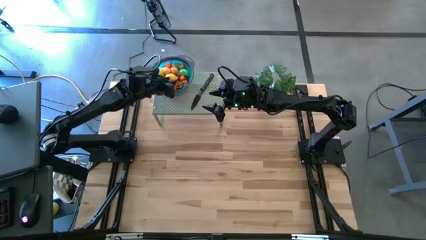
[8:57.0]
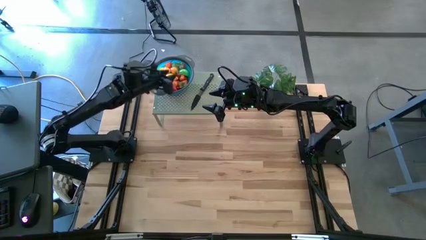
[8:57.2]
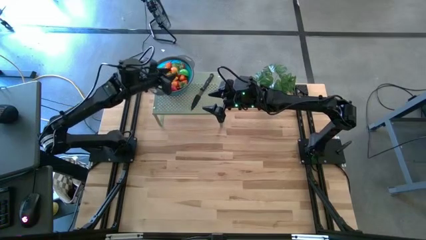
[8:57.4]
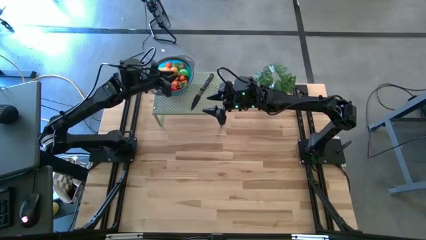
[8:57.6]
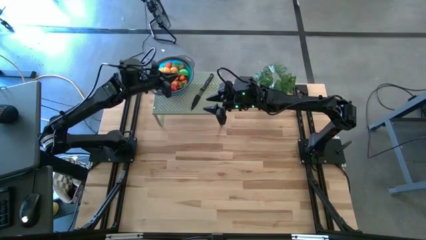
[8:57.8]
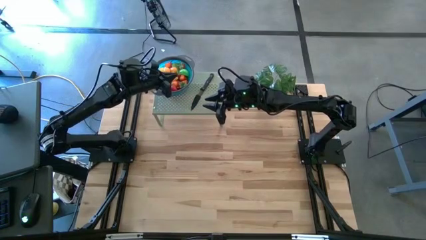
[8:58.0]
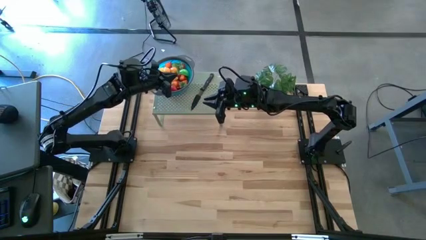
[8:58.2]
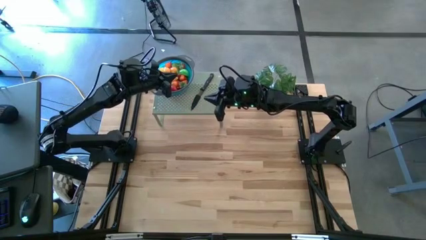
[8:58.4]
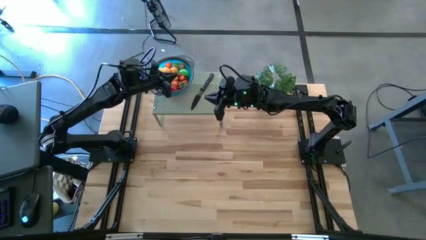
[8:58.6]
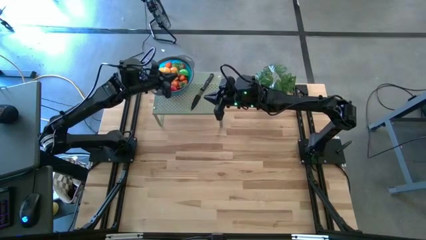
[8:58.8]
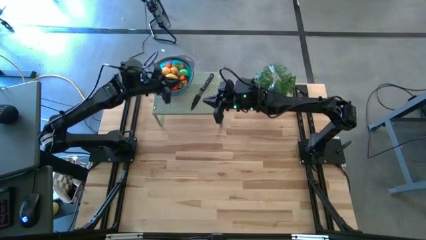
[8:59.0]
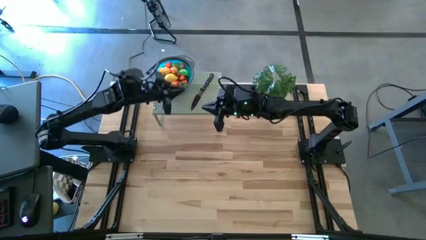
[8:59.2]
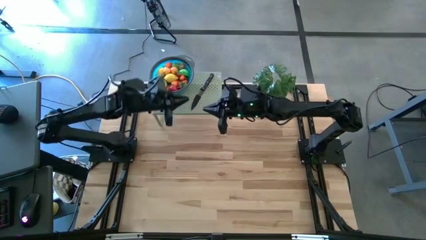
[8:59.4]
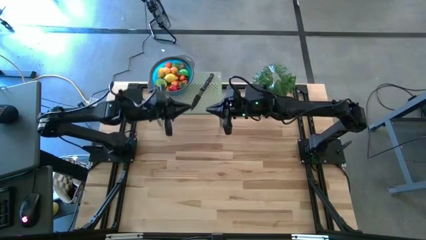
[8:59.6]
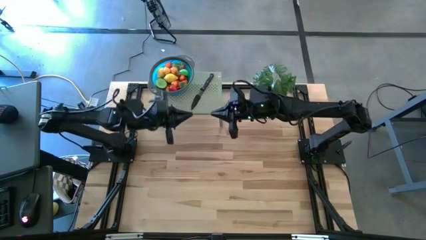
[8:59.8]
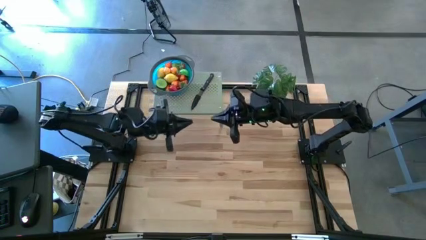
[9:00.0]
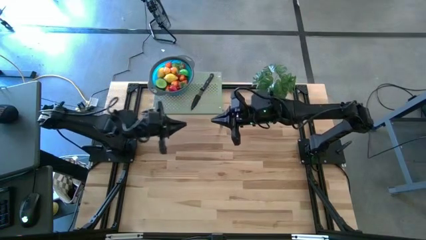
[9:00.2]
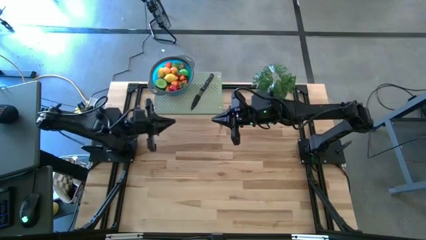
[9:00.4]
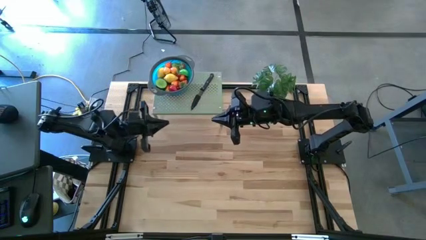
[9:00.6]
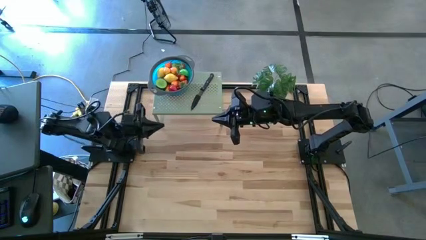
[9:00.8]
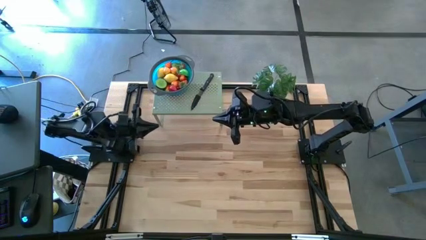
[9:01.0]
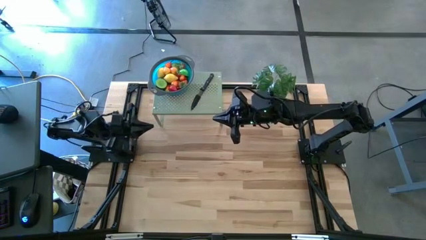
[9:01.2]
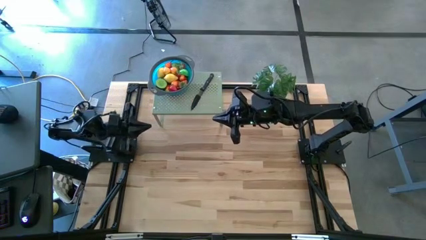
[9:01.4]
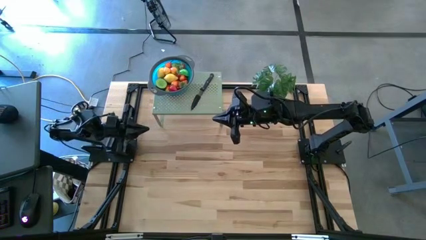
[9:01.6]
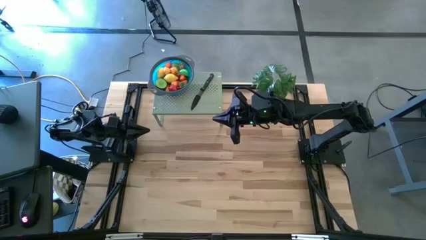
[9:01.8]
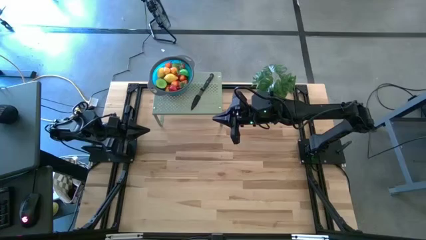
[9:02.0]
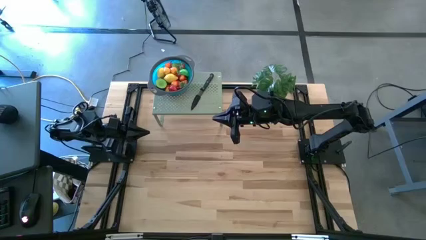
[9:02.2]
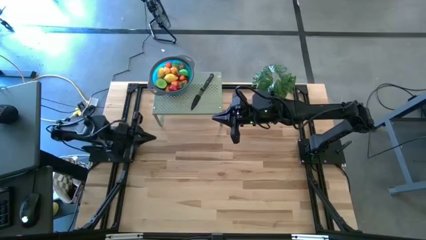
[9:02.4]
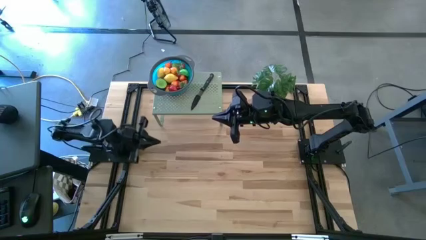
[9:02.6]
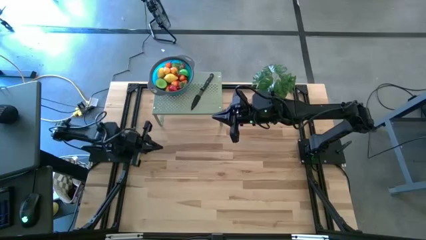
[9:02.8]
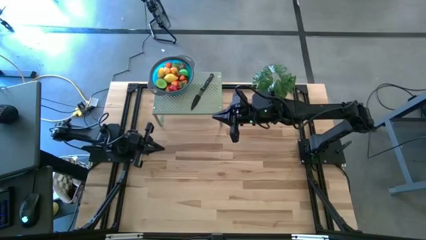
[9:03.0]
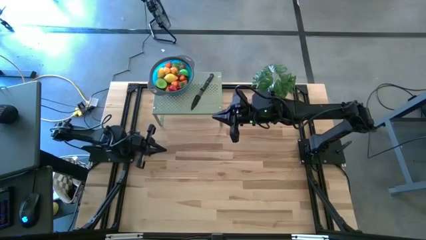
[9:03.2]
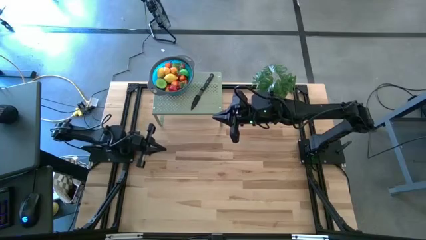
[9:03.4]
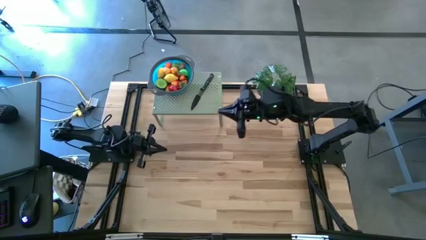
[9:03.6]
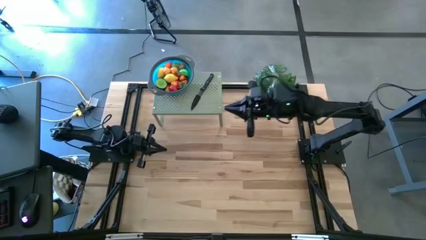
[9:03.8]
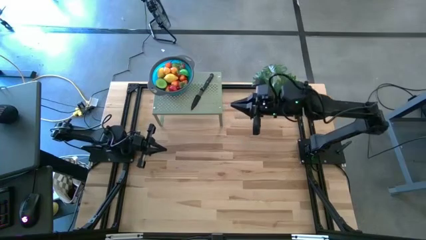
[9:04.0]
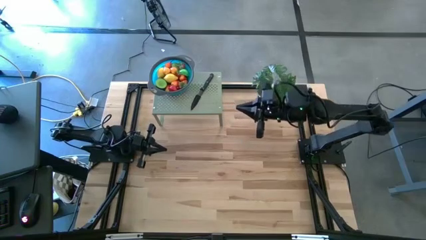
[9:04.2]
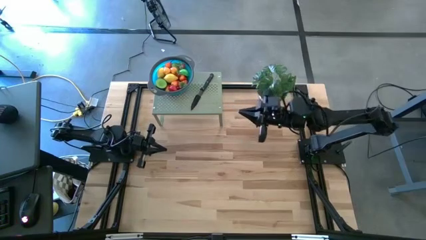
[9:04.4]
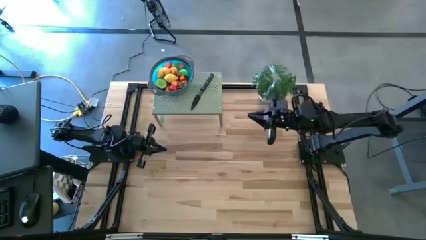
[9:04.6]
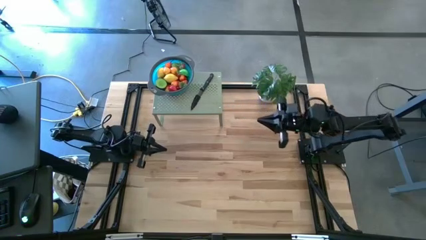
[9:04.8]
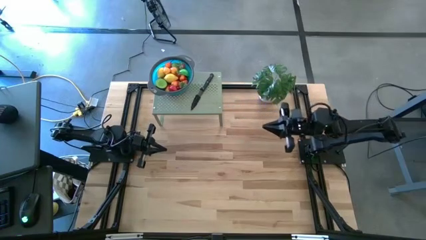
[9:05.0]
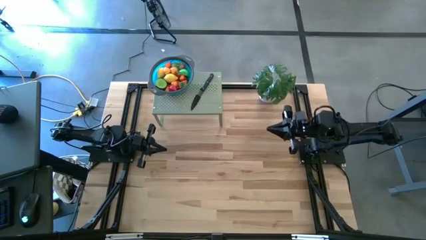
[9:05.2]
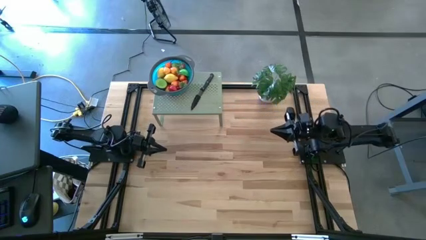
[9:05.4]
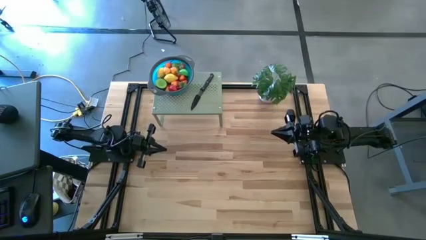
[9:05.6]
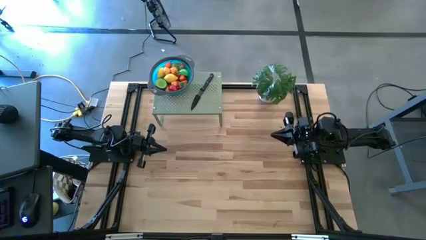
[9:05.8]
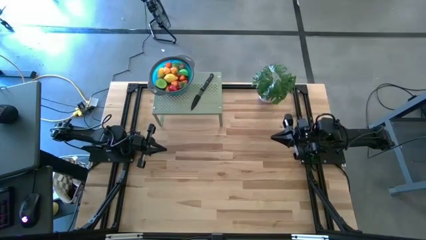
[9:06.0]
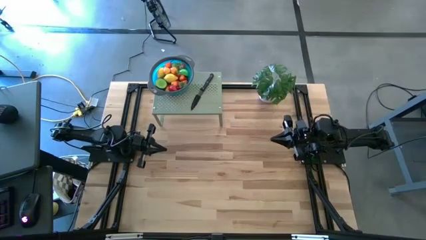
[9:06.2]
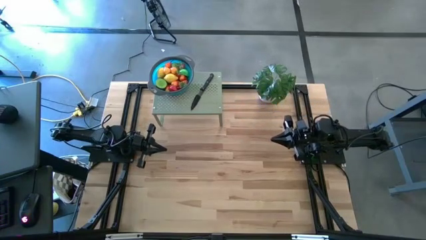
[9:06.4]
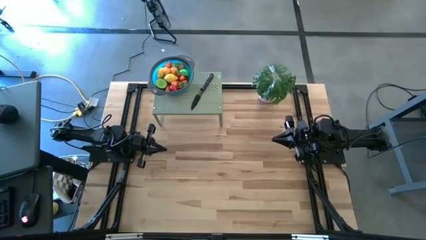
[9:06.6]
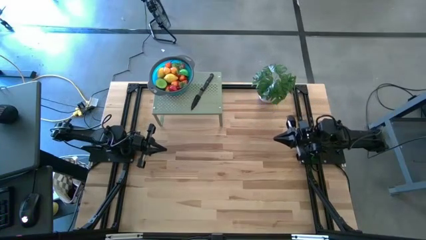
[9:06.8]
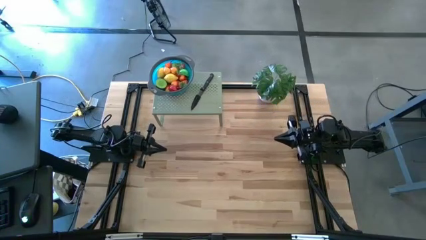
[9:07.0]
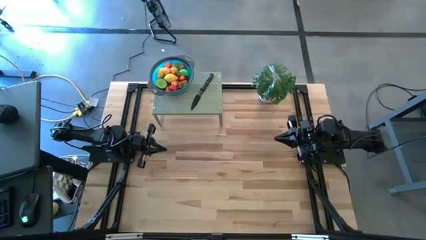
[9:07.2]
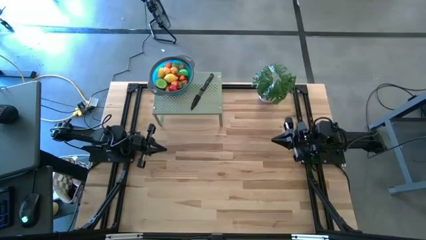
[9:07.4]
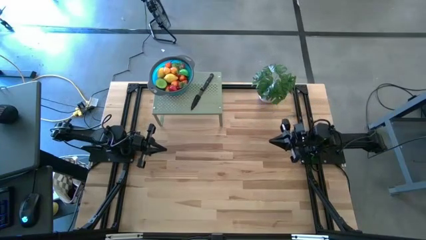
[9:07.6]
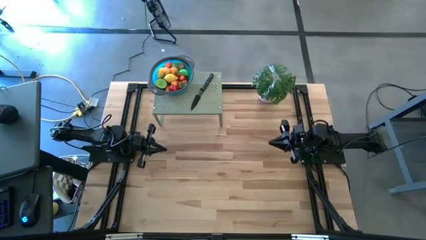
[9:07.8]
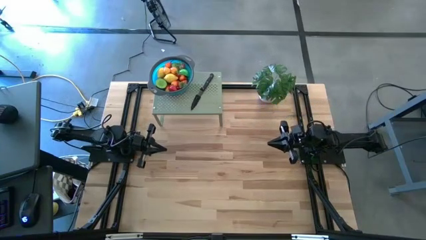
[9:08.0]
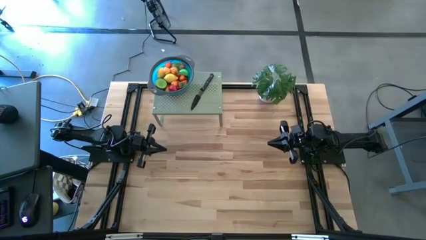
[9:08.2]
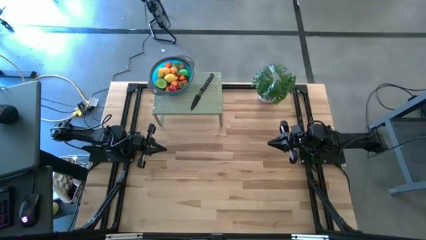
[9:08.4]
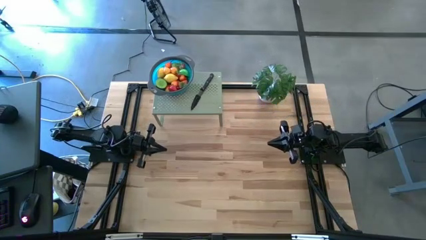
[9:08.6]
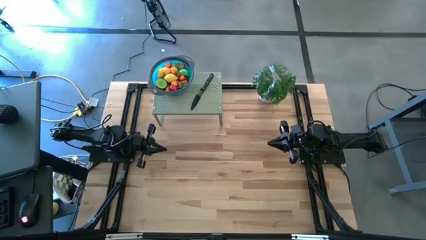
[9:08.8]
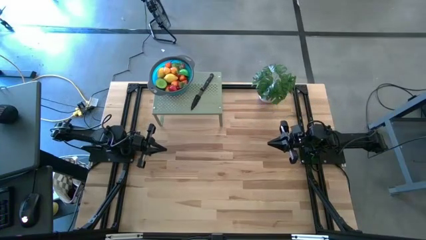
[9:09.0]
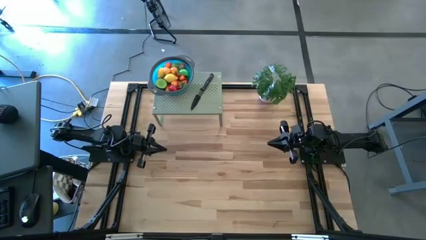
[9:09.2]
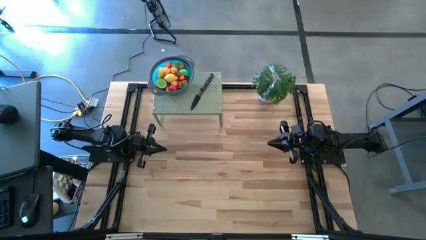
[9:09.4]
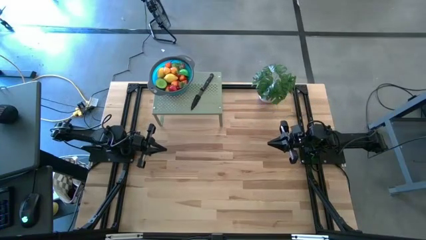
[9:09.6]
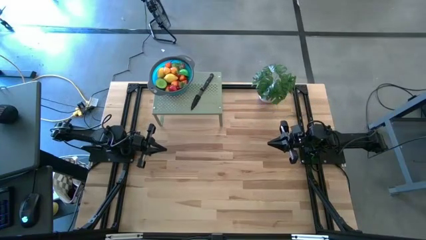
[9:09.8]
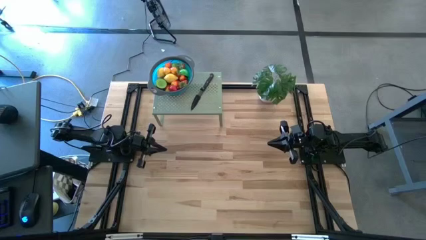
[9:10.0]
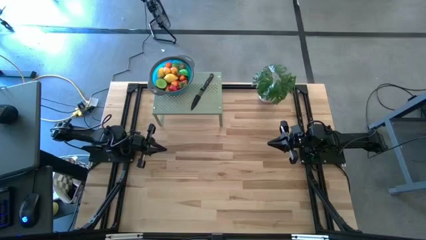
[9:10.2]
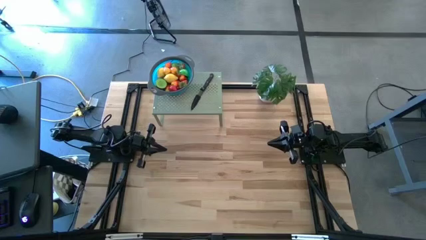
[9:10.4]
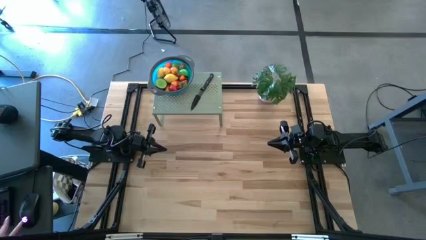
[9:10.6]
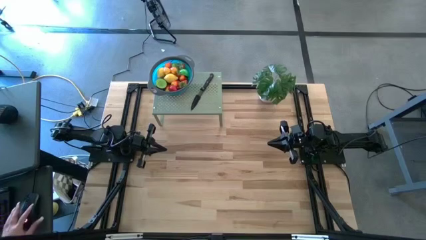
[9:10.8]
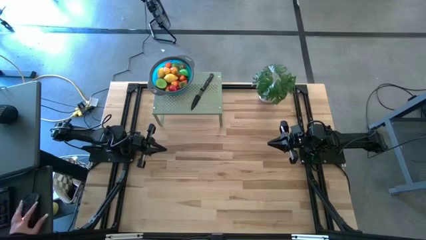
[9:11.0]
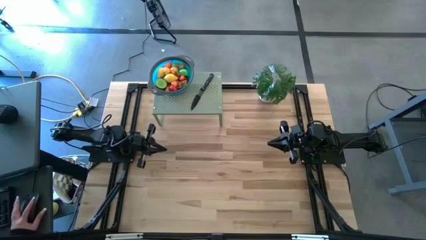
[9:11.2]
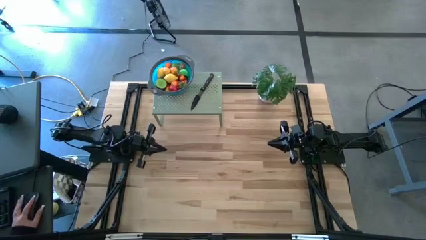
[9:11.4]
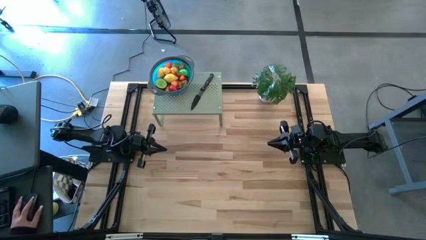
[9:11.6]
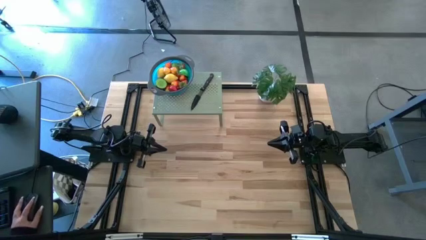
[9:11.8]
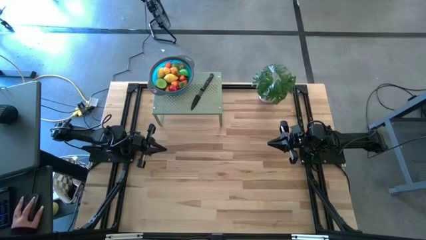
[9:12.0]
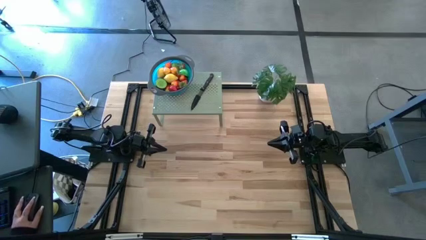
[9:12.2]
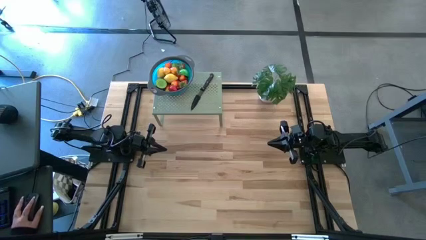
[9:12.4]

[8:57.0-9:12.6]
Task: Pick & Place Fruit
Return to Home Position
